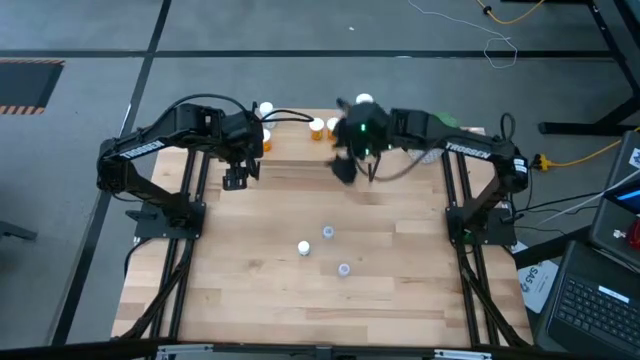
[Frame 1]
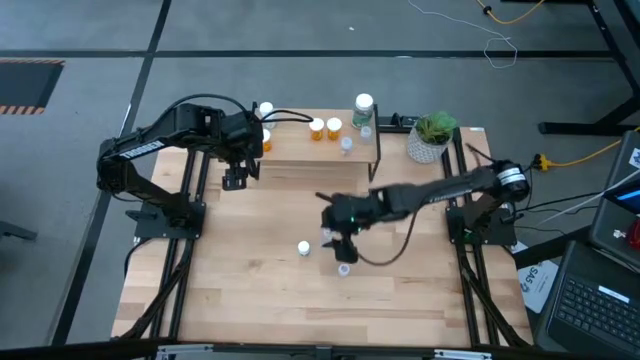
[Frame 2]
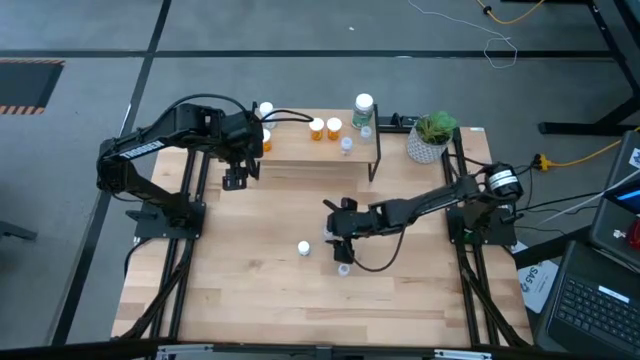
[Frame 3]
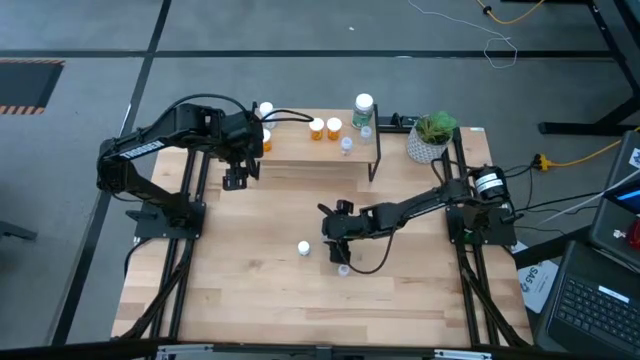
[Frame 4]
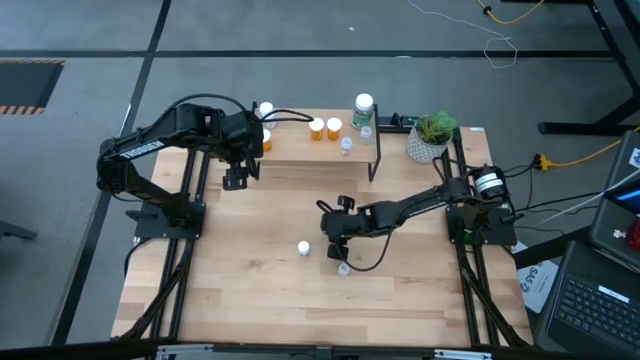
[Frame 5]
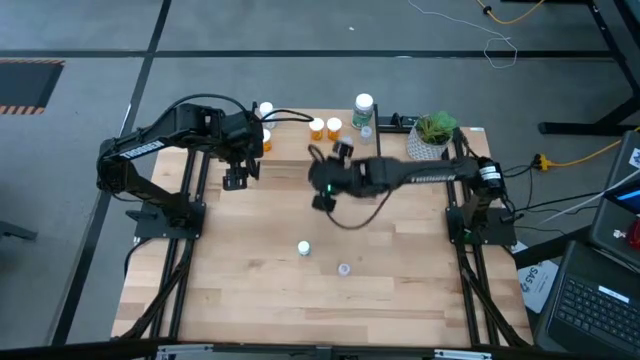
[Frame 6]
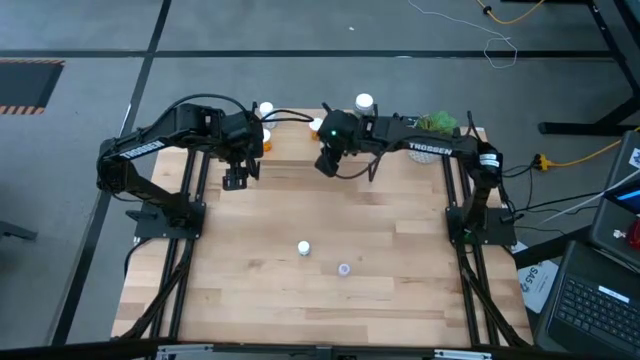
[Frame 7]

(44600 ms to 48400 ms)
Task: Pick and place medicine bottles onto shelf by color
Put the transparent medicine bottle on the shelf

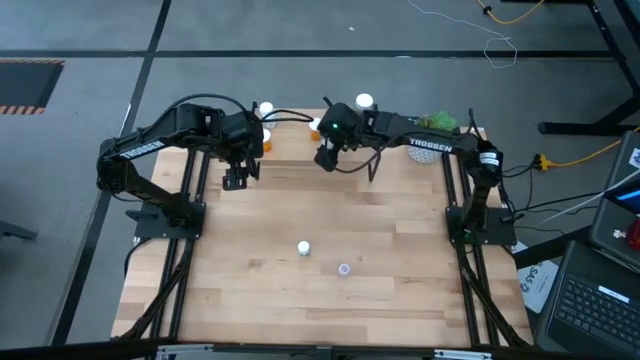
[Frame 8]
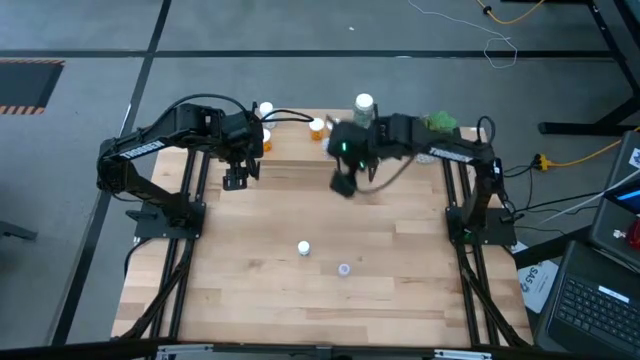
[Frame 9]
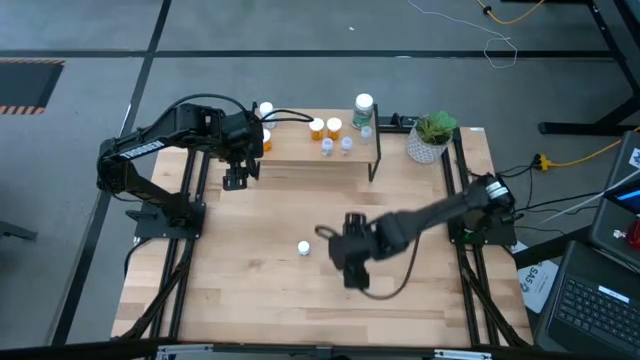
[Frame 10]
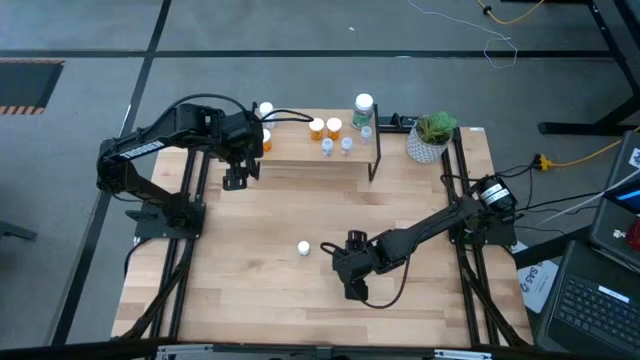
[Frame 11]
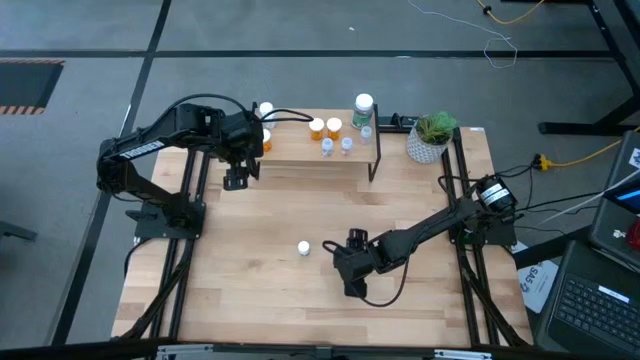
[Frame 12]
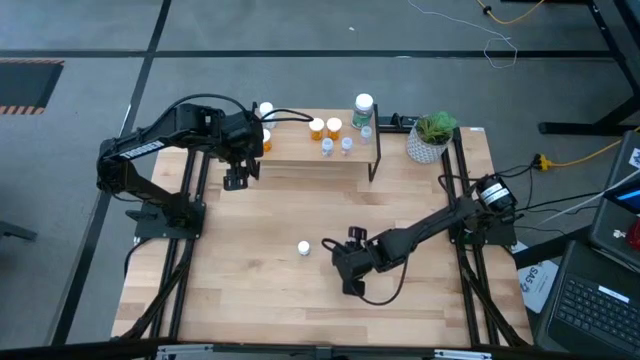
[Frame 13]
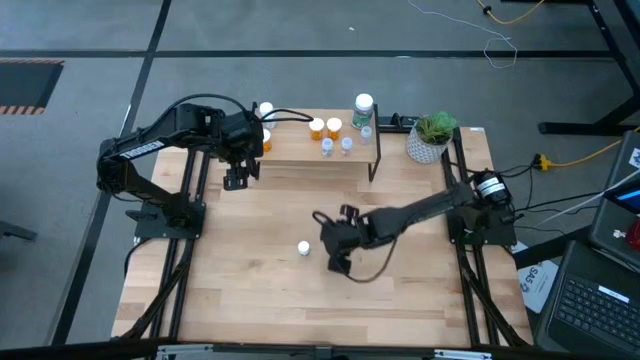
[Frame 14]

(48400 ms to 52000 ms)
Put the transparent medicine bottle on the shelf

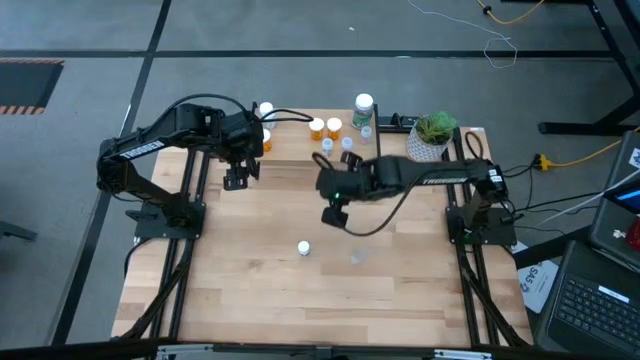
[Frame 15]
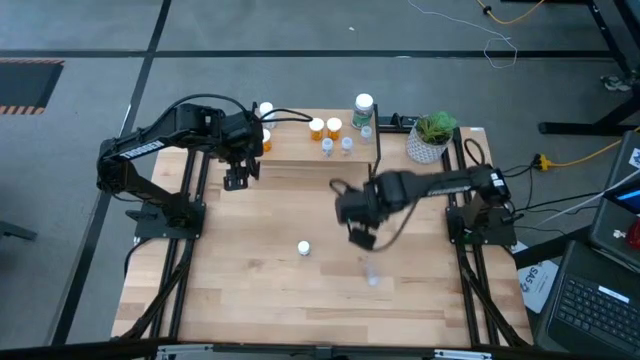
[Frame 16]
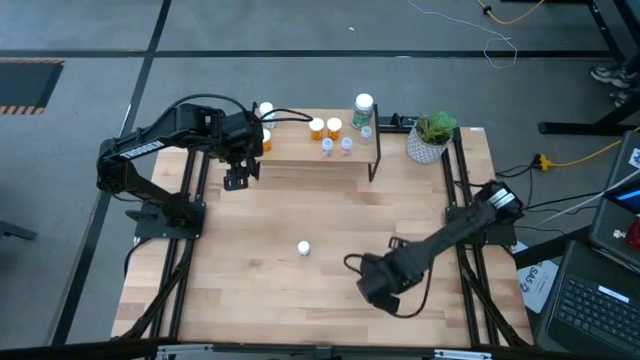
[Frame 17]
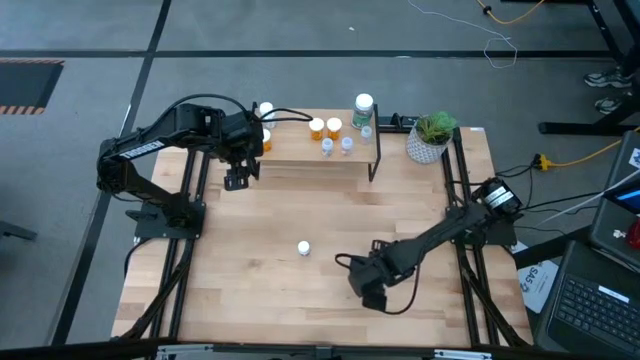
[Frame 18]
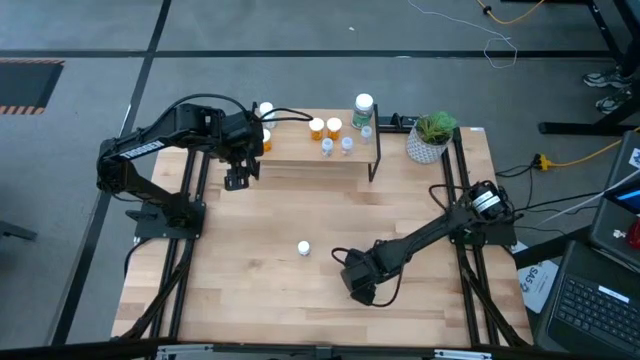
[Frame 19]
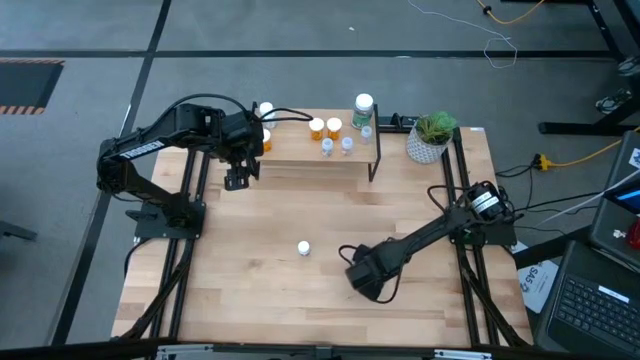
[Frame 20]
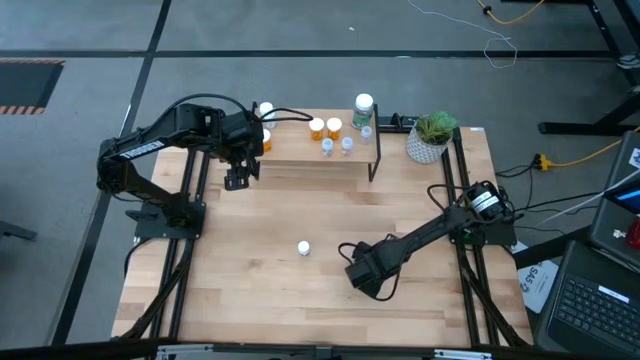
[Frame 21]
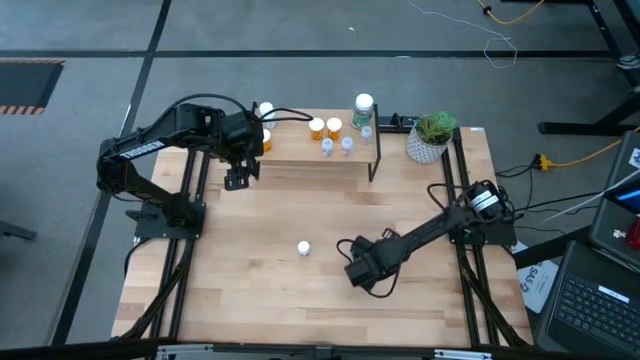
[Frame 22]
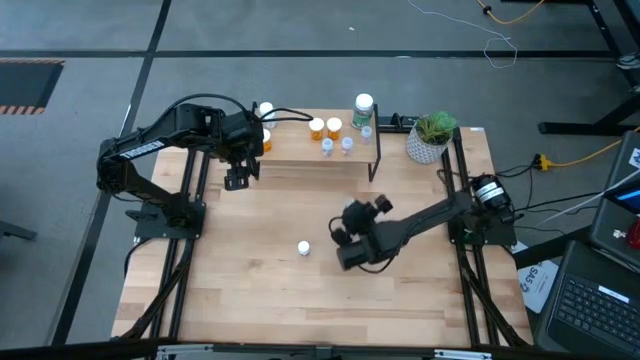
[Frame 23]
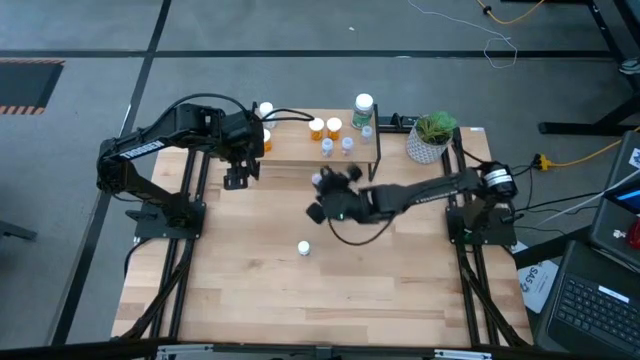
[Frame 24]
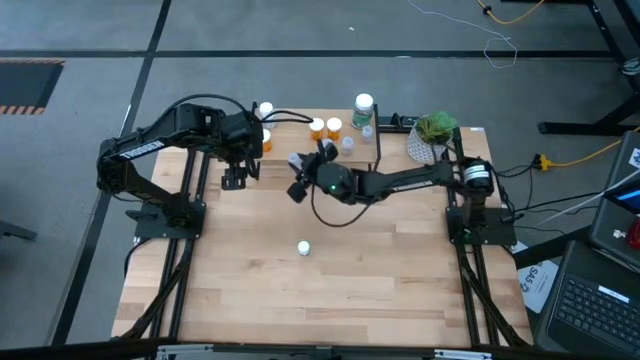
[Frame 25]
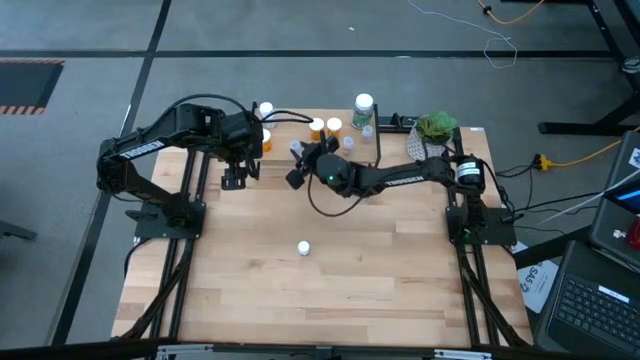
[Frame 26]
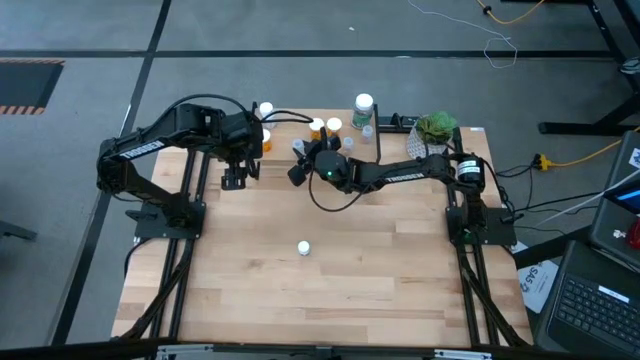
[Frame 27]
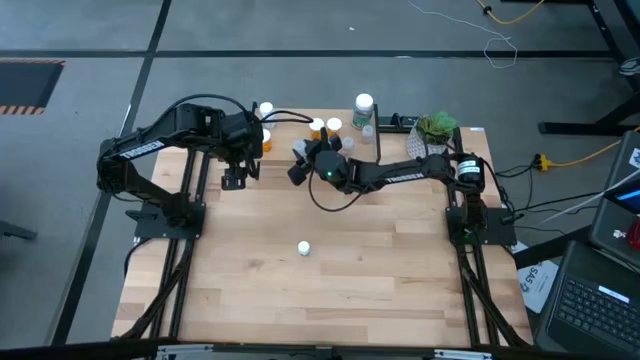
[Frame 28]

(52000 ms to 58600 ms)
Put the transparent medicine bottle on the shelf

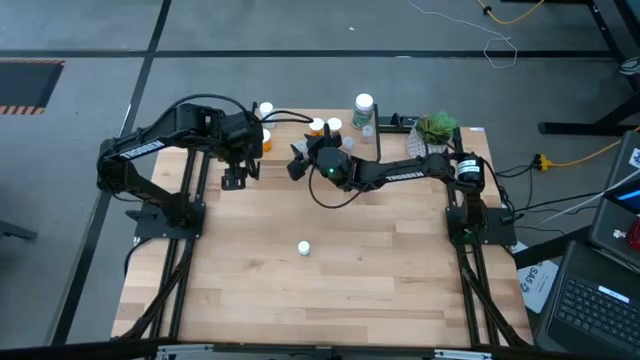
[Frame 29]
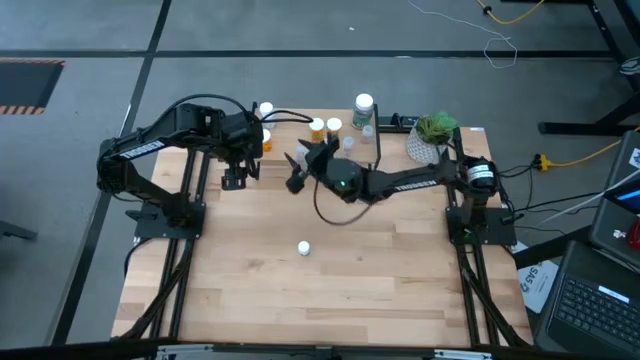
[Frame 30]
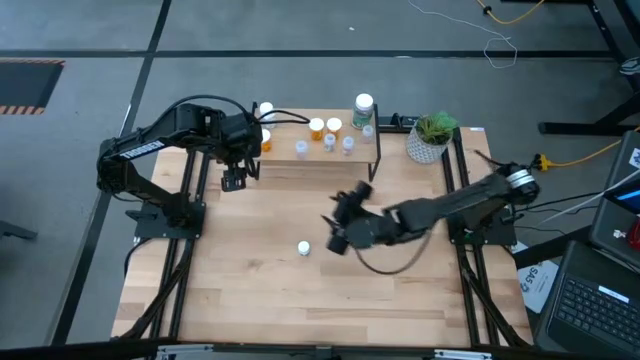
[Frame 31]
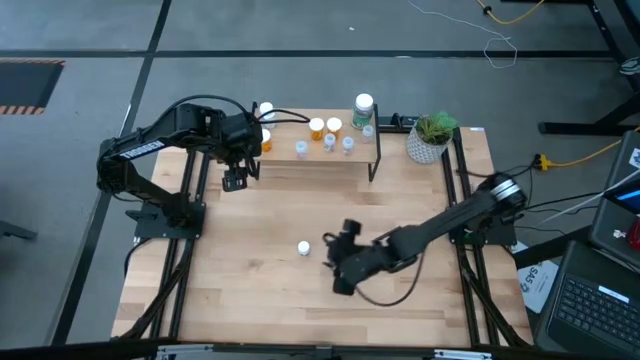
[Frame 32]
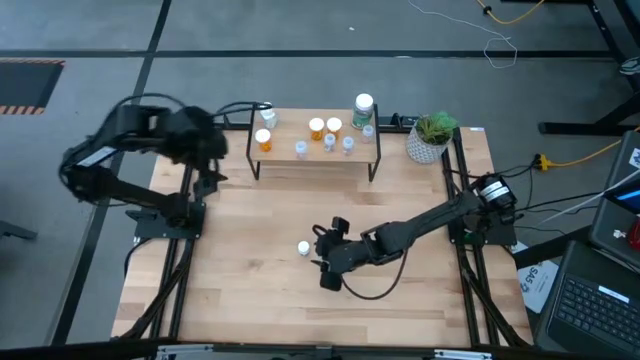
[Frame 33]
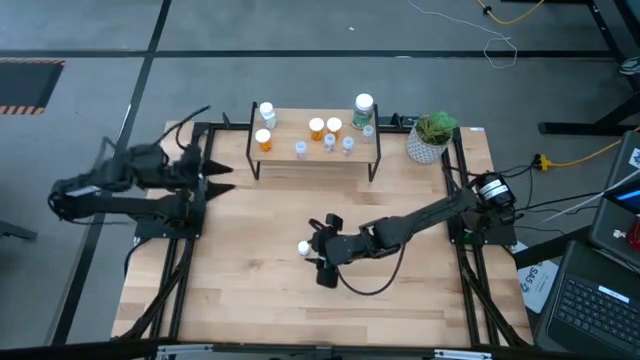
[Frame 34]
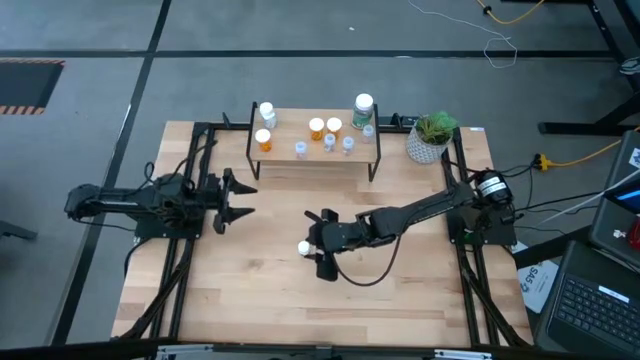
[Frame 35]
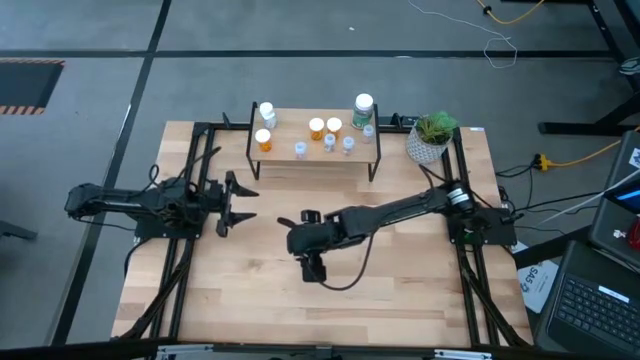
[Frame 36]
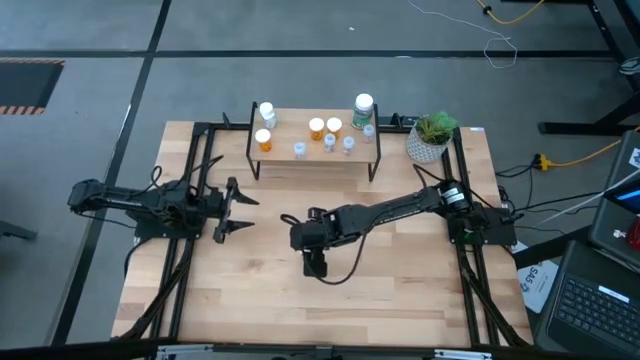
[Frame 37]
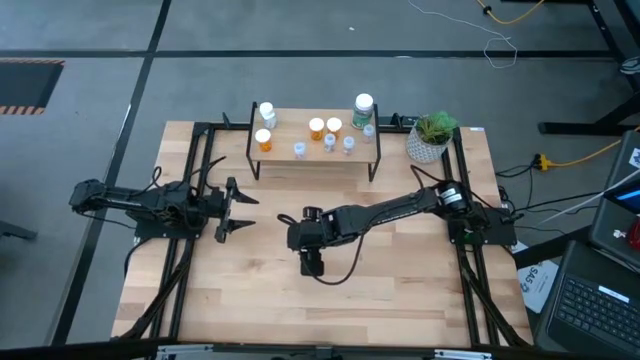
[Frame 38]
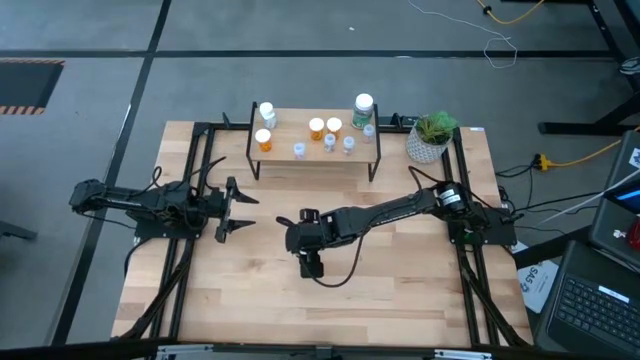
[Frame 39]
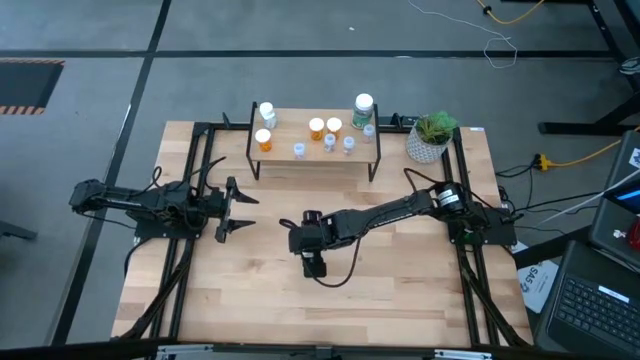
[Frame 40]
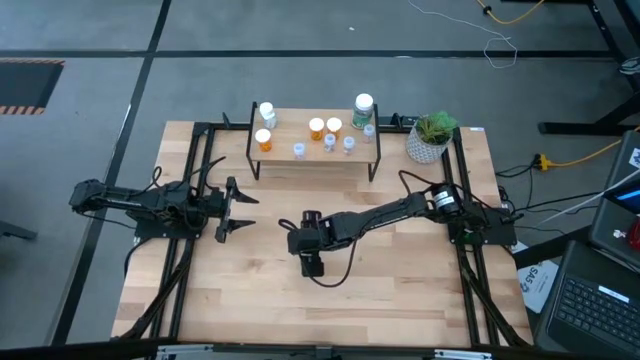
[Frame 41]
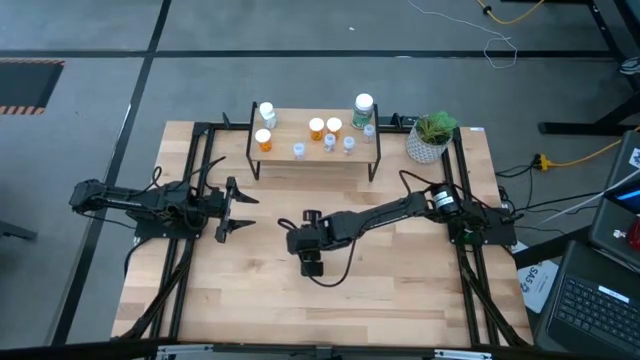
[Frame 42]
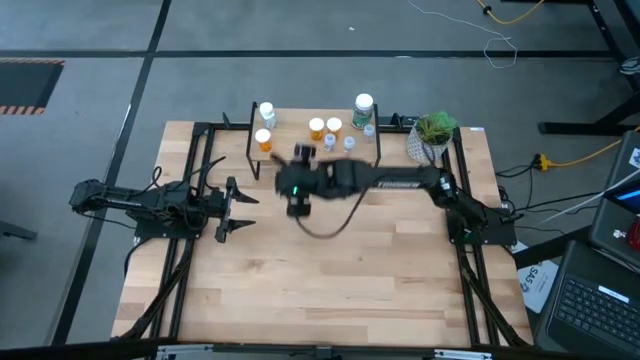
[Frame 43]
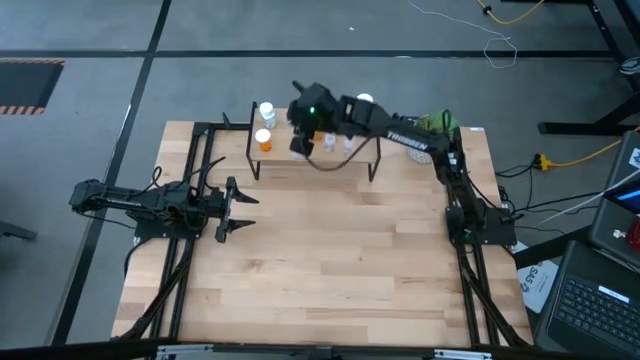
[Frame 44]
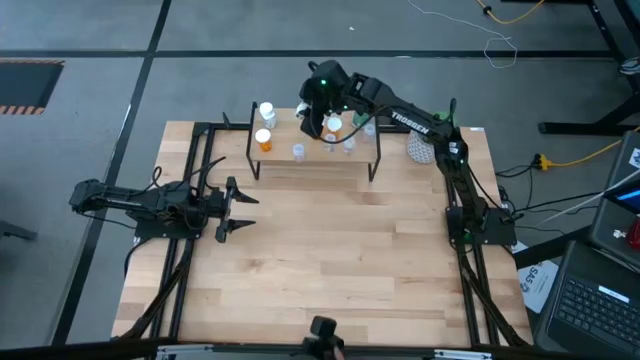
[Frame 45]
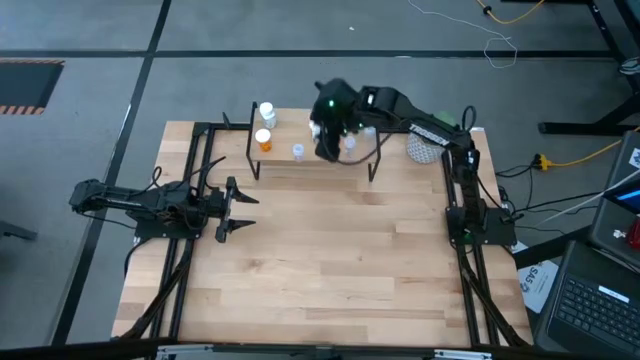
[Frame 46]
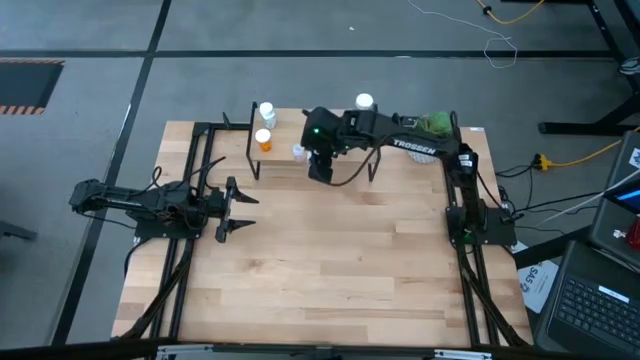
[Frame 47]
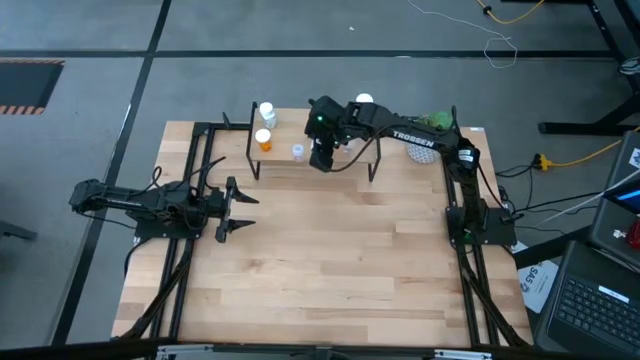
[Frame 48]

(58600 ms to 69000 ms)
Put the small white medicine bottle on the shelf
